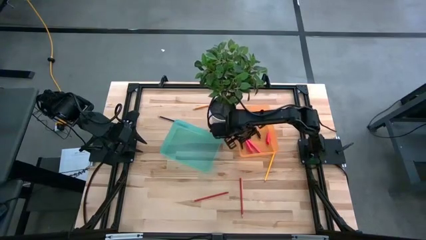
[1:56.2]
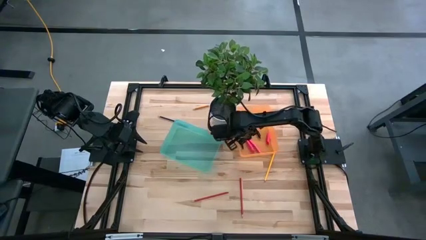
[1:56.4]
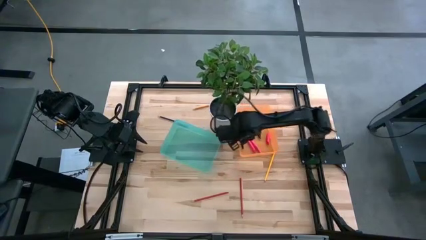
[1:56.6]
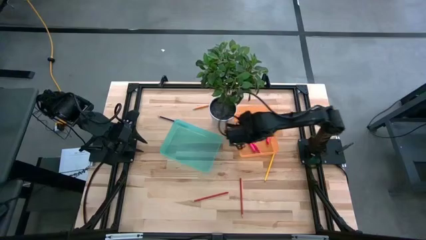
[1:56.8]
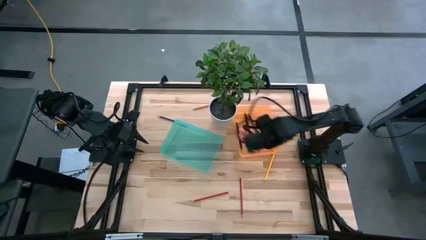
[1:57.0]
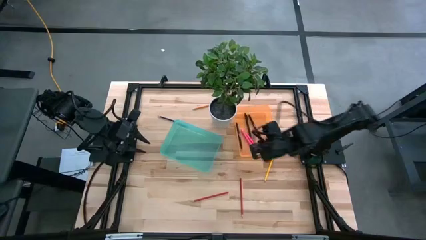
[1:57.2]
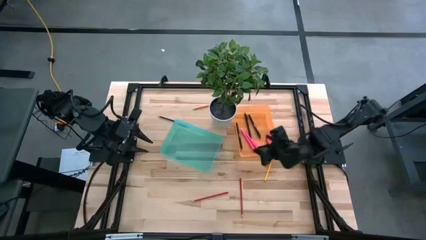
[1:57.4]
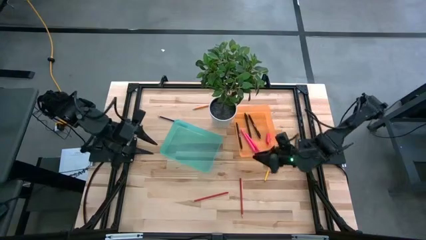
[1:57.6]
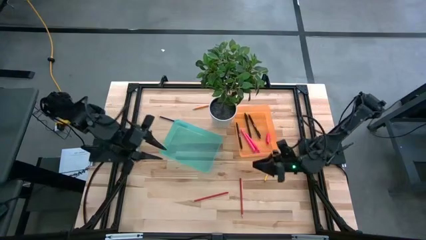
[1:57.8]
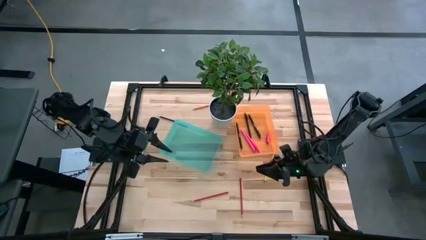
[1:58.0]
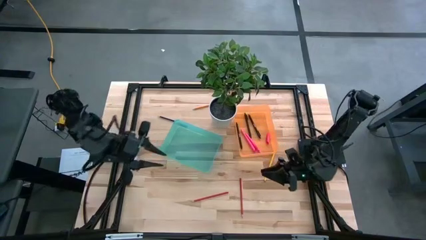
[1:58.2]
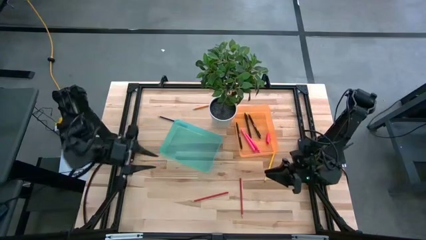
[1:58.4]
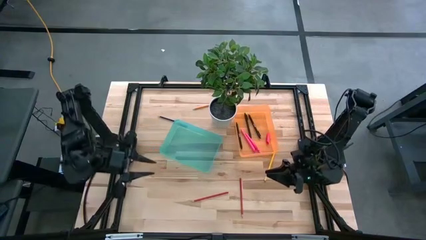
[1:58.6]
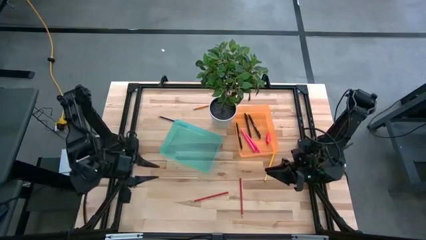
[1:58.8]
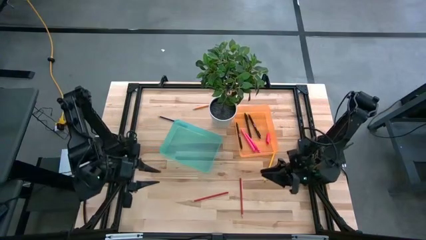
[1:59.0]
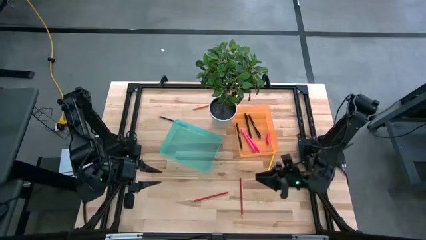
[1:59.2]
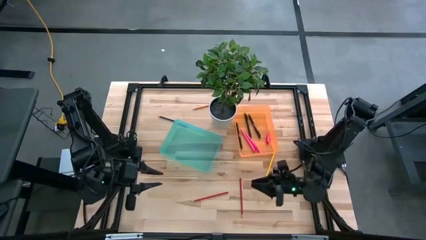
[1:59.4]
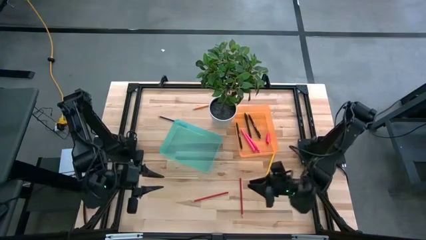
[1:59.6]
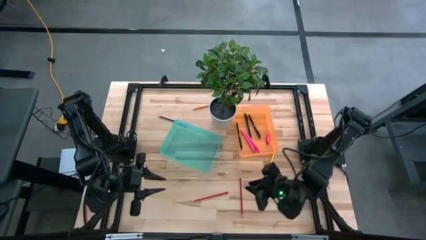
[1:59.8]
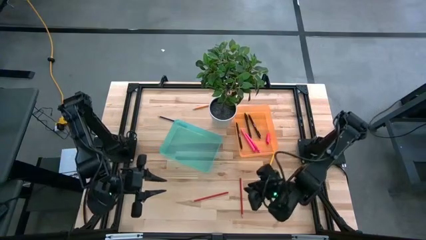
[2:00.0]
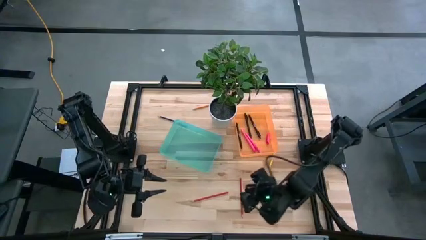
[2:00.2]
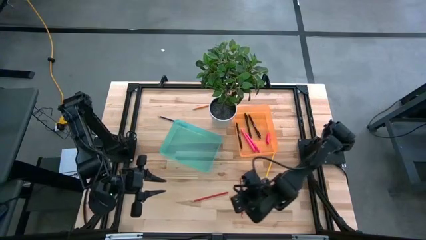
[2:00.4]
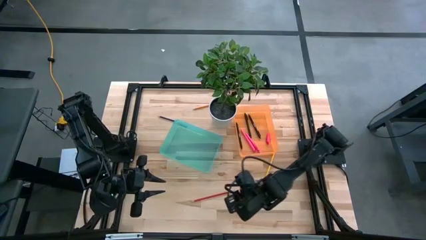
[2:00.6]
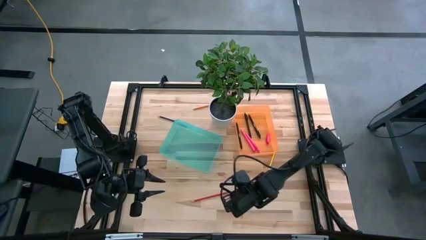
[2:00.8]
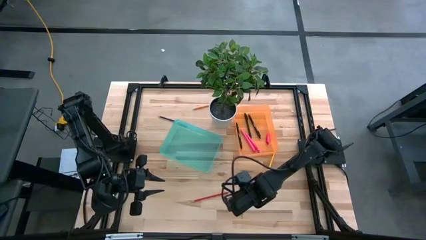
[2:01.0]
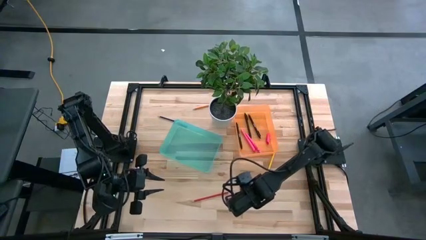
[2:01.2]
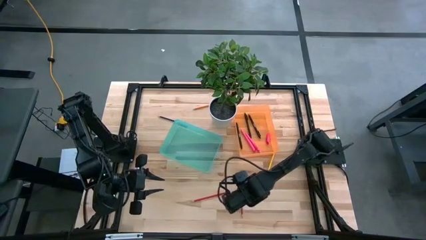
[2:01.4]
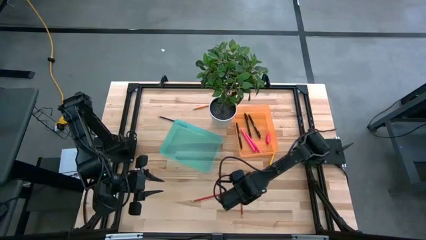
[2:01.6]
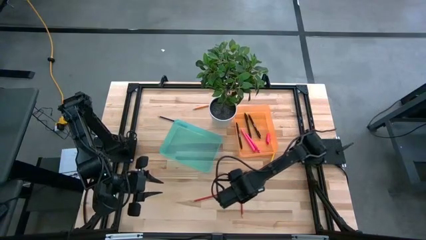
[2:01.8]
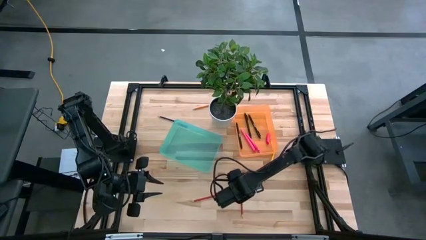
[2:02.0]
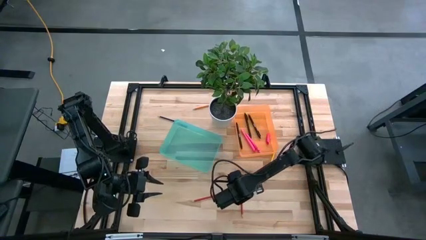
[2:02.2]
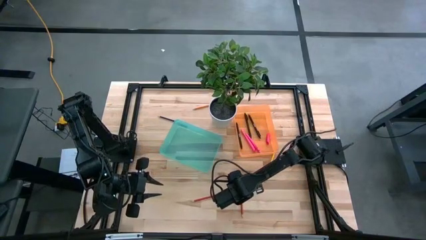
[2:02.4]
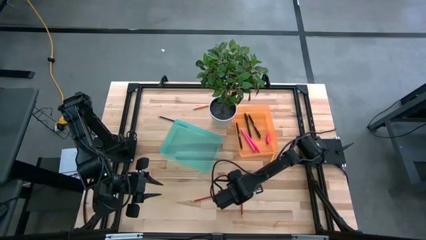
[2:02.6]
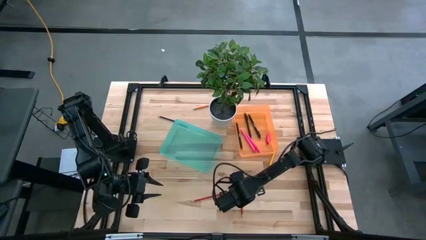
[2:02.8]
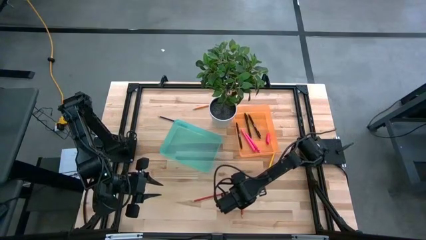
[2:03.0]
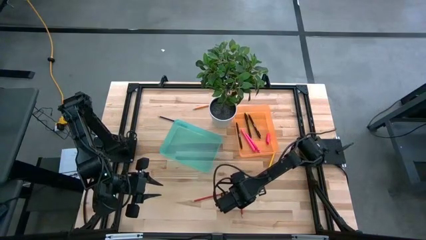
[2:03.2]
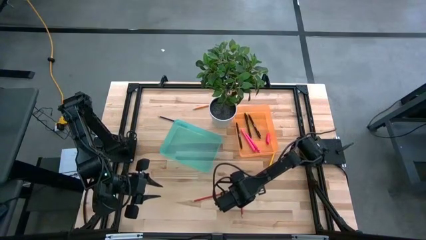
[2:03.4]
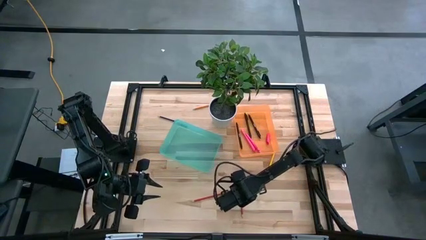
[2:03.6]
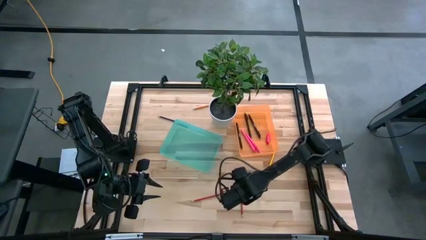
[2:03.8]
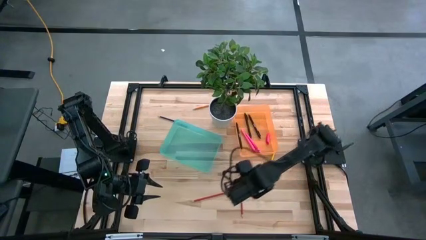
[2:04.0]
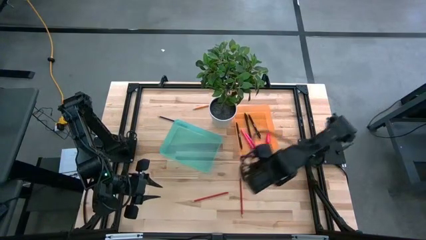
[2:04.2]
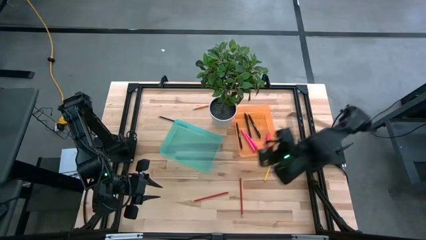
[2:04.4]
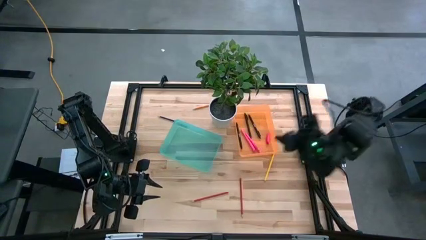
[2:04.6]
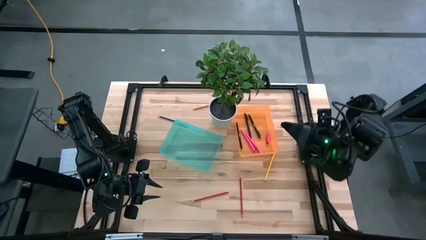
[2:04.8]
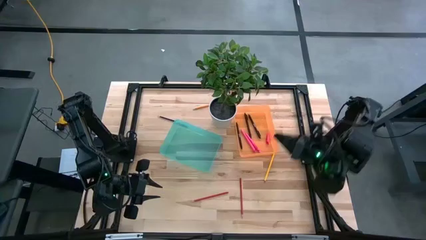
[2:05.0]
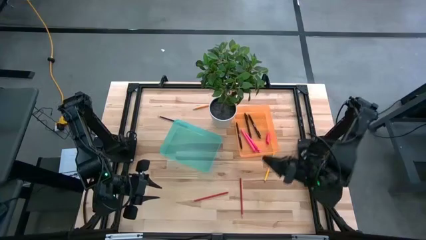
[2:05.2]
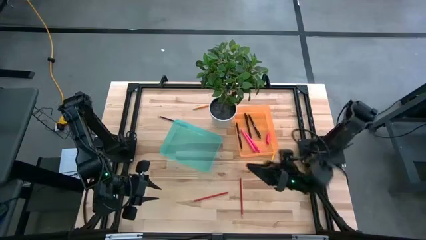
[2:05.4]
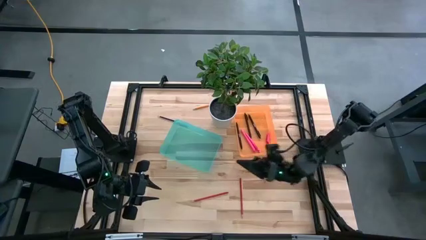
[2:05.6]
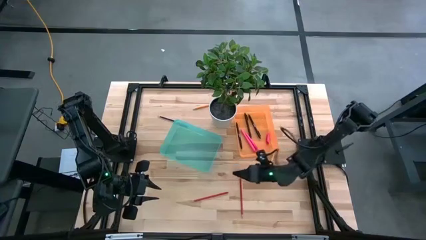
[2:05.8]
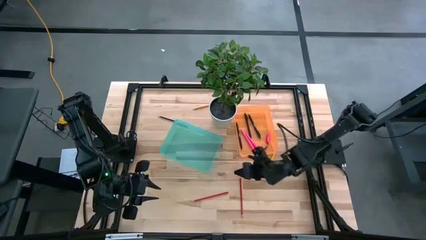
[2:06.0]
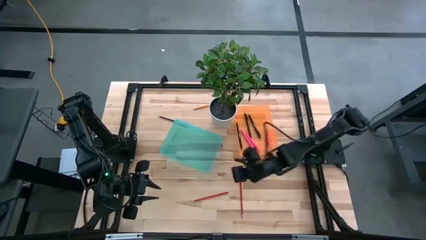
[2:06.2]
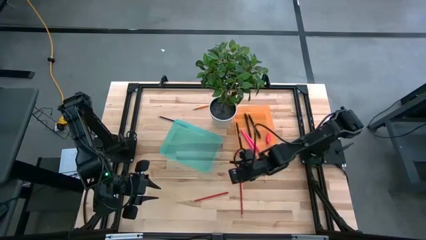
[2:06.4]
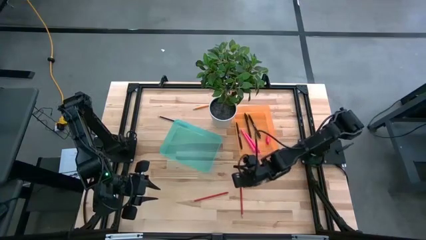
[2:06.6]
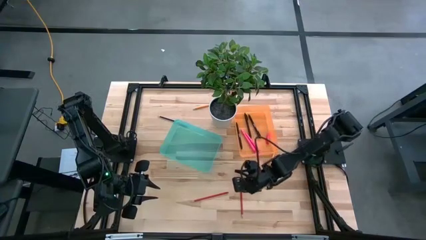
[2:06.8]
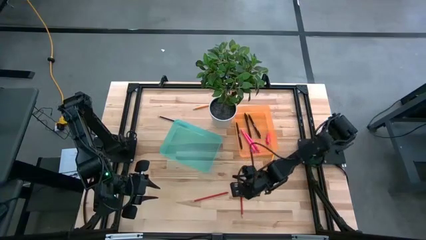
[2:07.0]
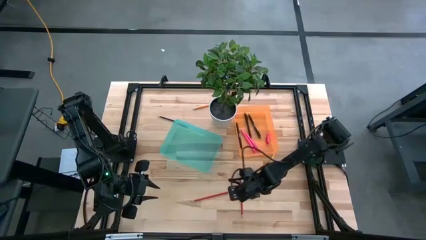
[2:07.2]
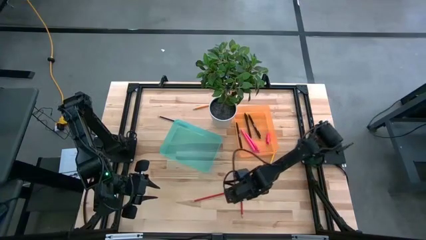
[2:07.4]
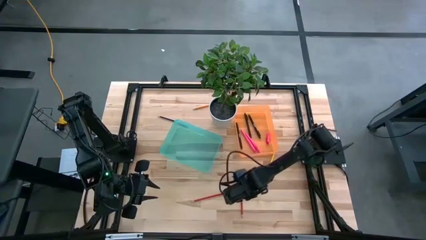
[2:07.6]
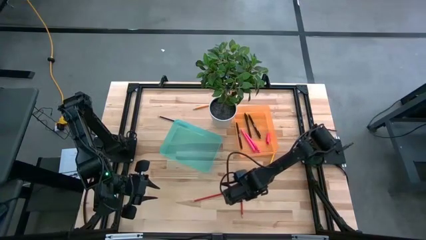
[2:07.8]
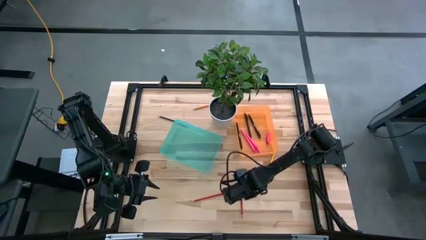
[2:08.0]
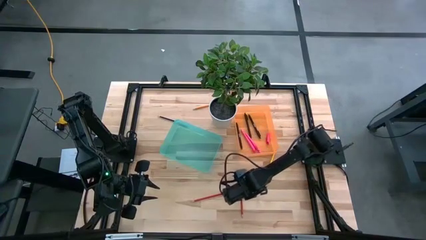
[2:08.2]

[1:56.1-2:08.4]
Task: Sort pens & pencils
Put the right red pencil into the blue bin
